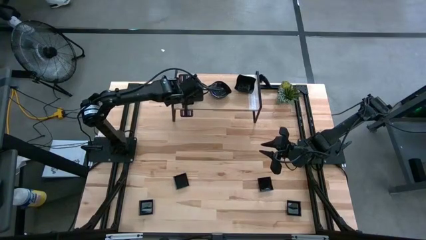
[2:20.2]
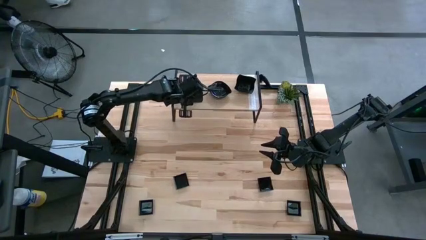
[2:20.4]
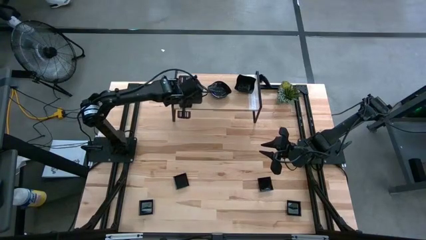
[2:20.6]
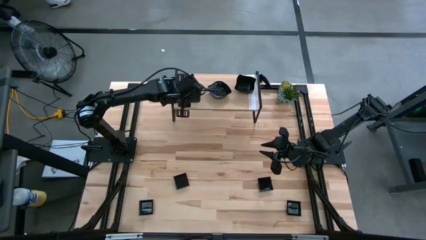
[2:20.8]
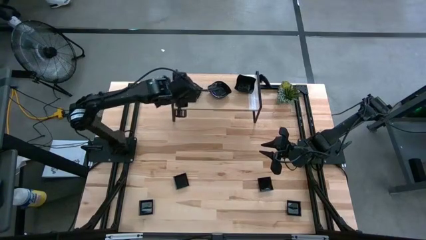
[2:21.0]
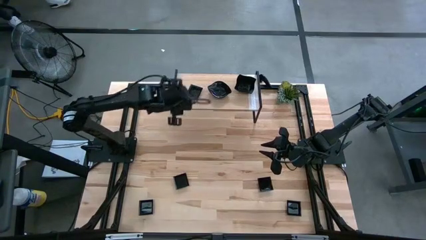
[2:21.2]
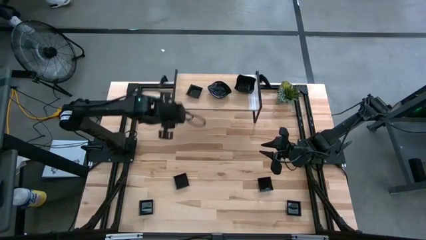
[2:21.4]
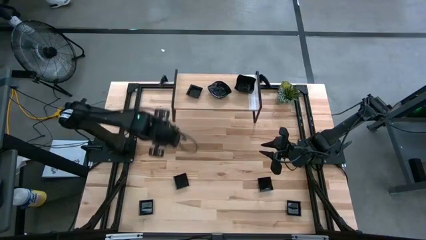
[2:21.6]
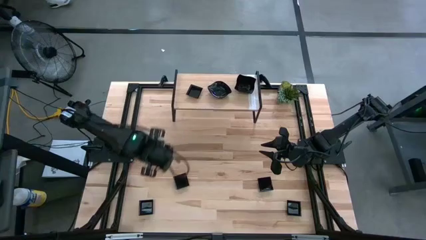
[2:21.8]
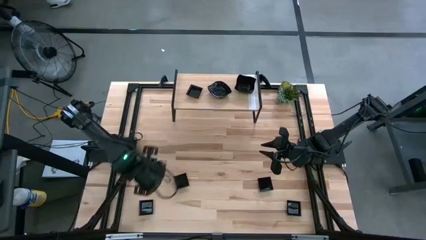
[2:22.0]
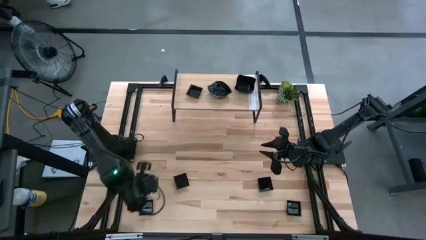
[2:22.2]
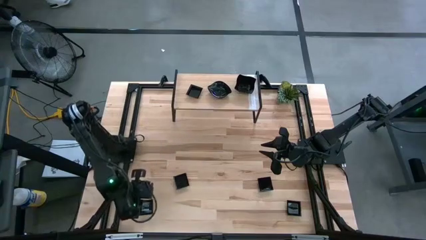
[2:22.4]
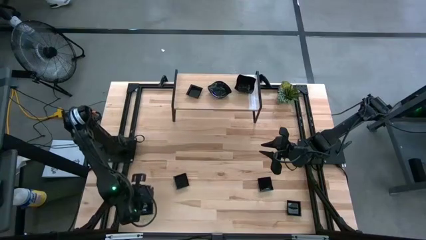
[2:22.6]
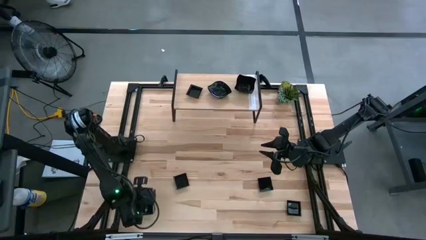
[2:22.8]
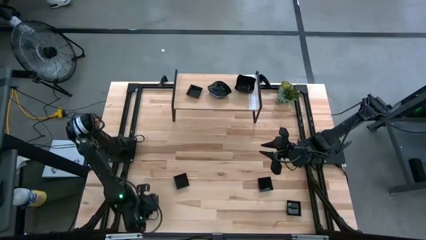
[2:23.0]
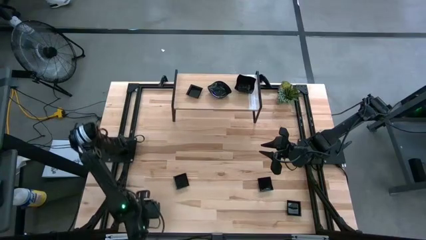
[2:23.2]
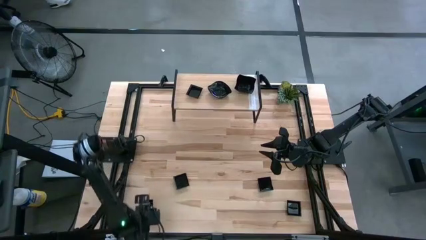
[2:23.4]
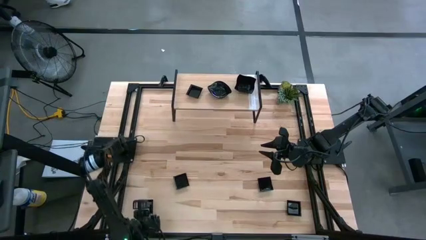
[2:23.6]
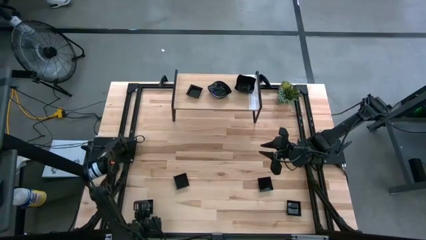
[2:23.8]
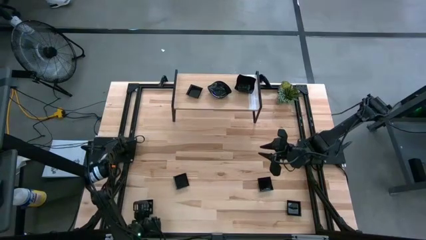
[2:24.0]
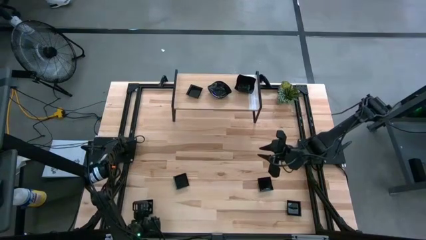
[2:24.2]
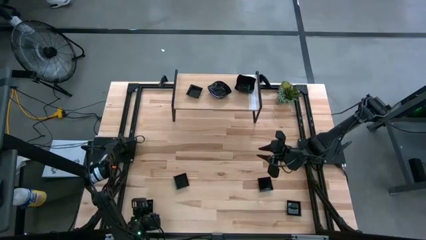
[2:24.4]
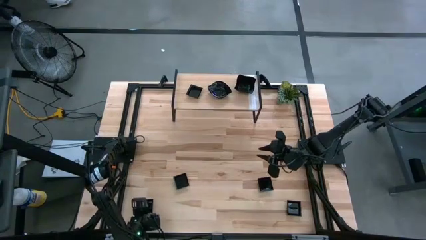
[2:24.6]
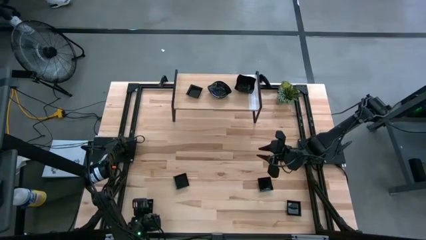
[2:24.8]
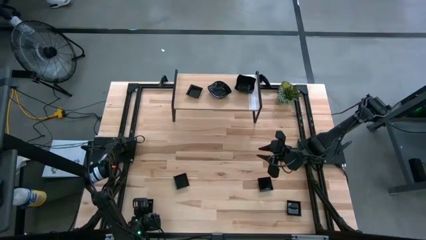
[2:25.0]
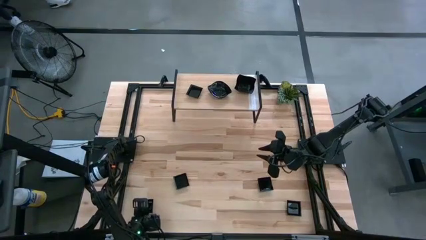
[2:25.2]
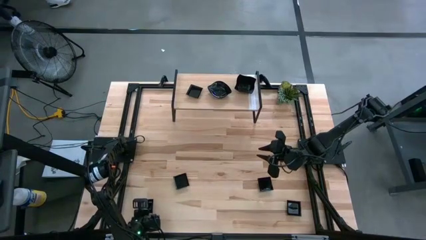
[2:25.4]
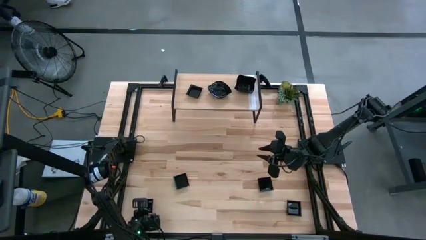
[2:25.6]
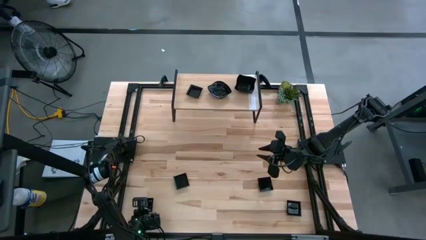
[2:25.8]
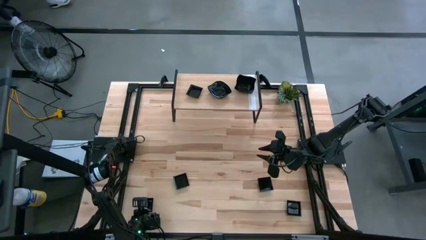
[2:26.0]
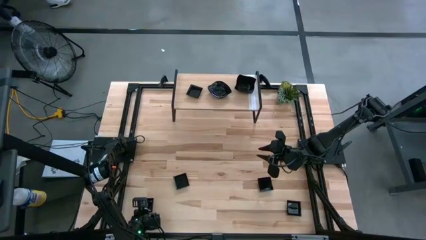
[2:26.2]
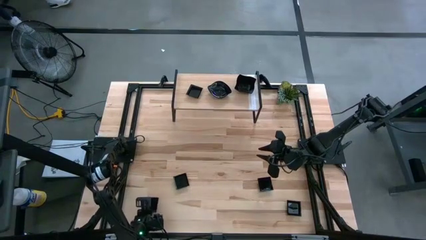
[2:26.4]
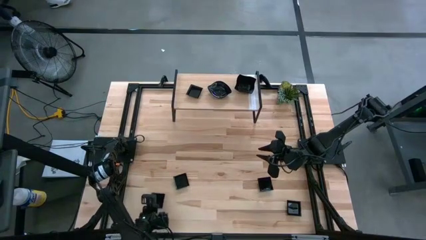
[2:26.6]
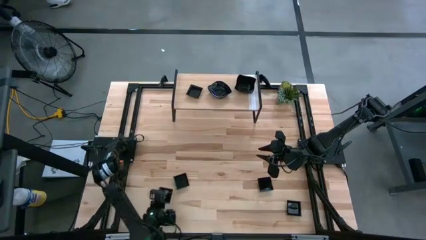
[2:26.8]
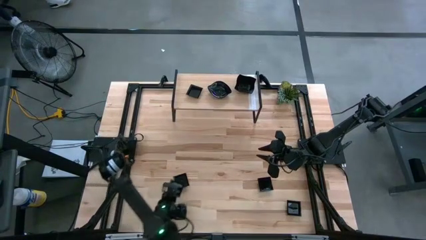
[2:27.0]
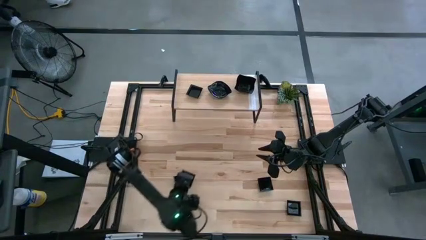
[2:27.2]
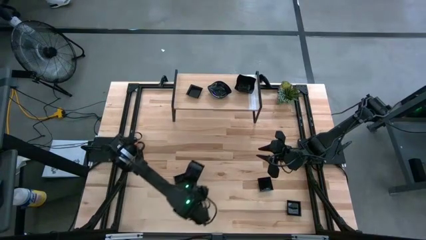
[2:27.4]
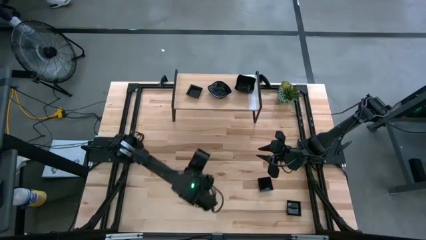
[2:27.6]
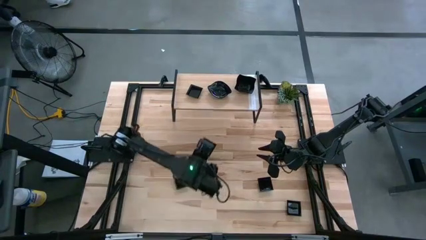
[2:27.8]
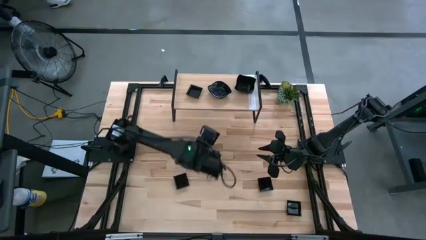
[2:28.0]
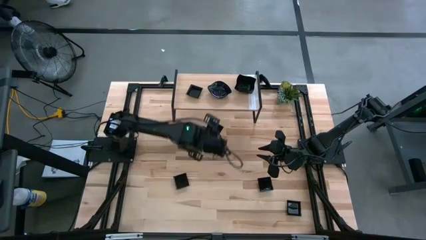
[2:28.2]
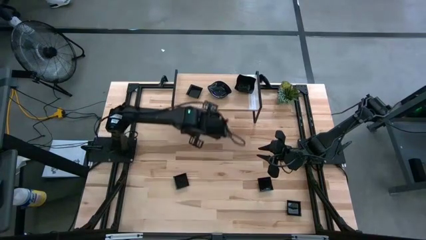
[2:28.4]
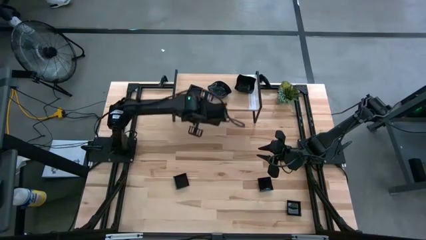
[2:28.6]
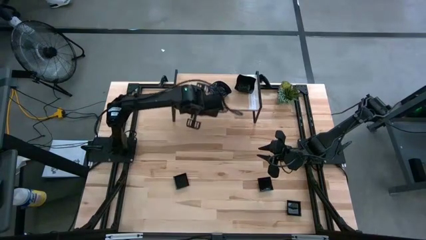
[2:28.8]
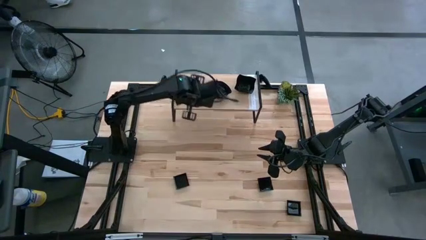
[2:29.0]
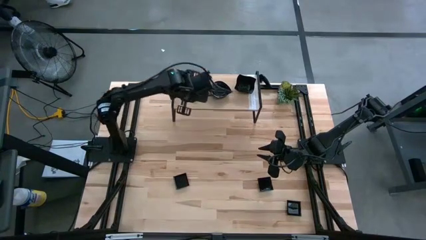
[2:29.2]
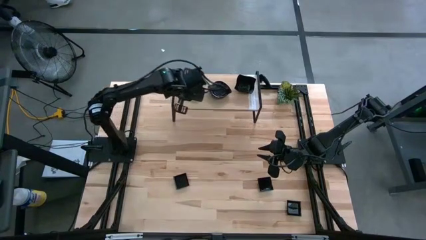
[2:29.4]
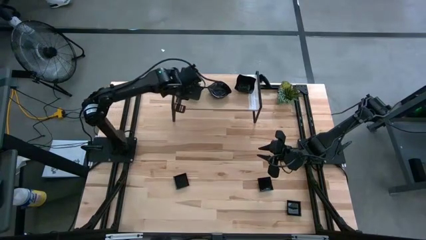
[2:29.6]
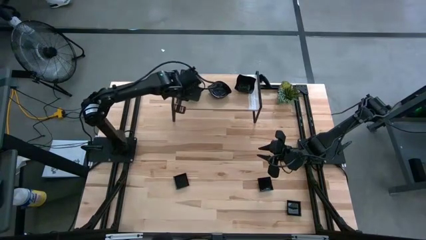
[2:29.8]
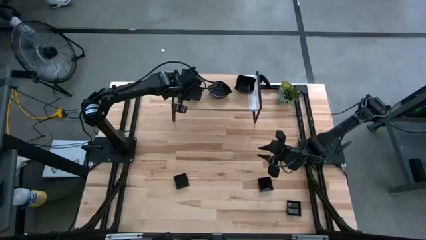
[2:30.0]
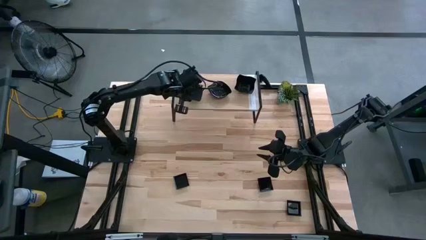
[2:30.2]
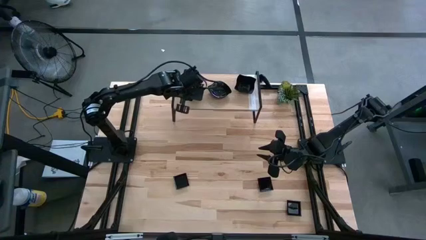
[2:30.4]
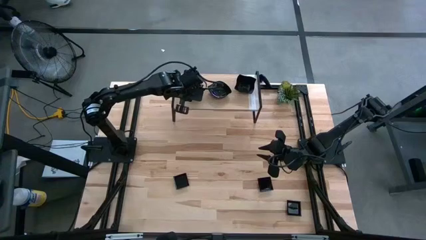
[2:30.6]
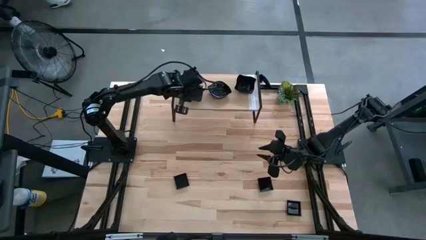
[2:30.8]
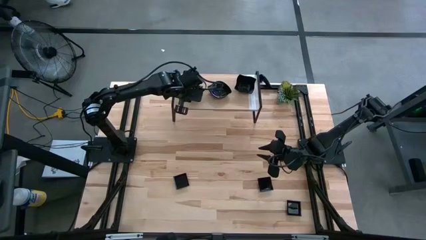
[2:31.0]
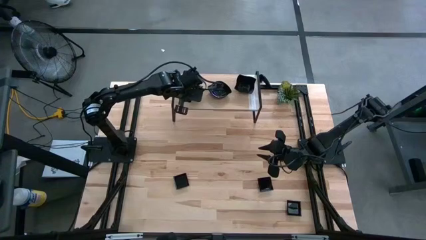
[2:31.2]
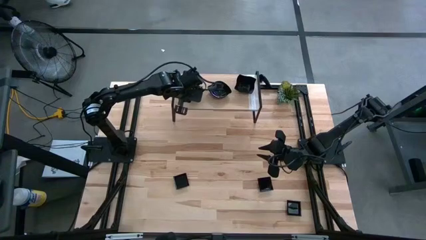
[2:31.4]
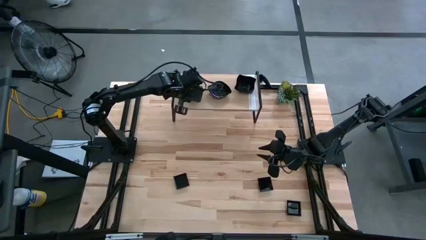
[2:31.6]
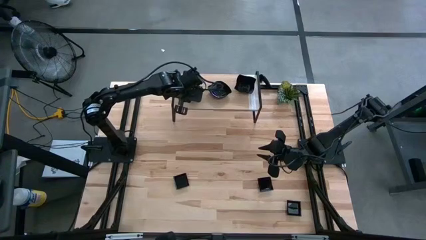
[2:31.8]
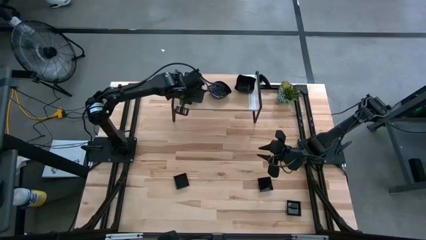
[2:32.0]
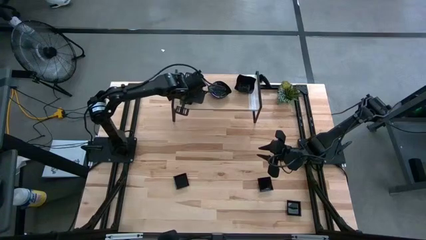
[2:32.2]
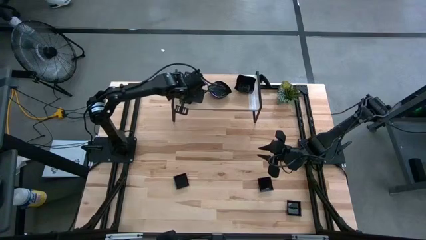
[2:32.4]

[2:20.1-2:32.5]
Task: Pick & Place Mini shaped plates
Stack the square plate on top of the other square plate on the shelf
